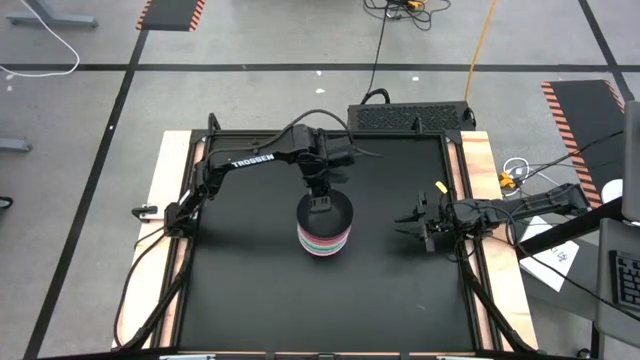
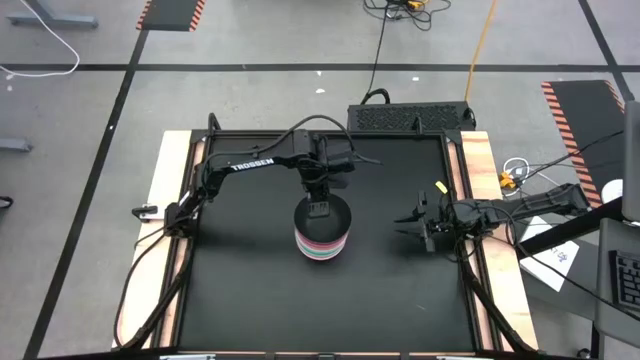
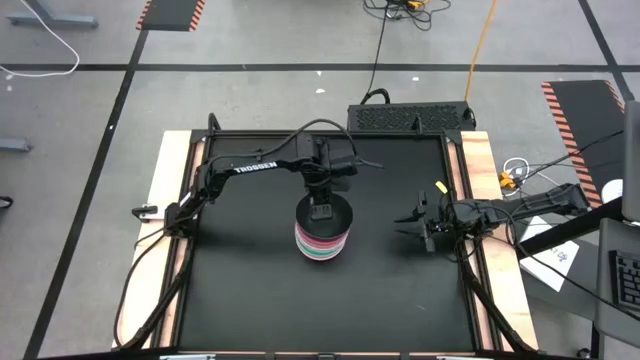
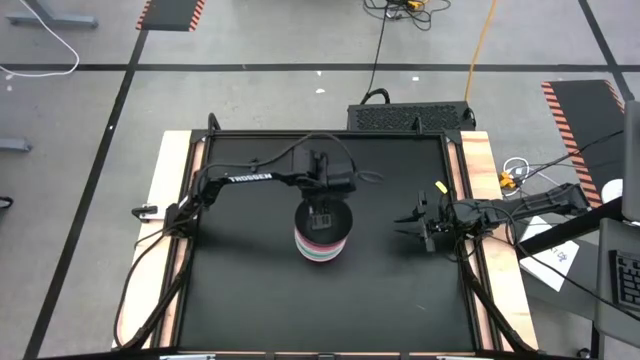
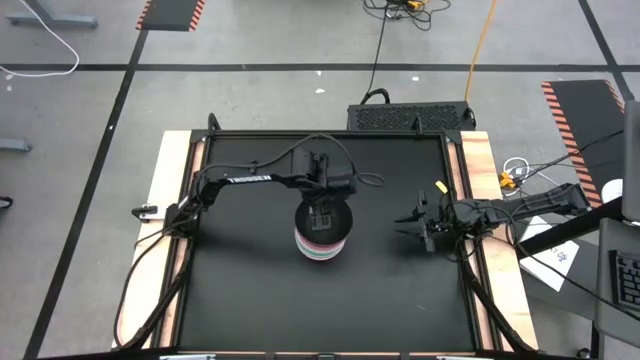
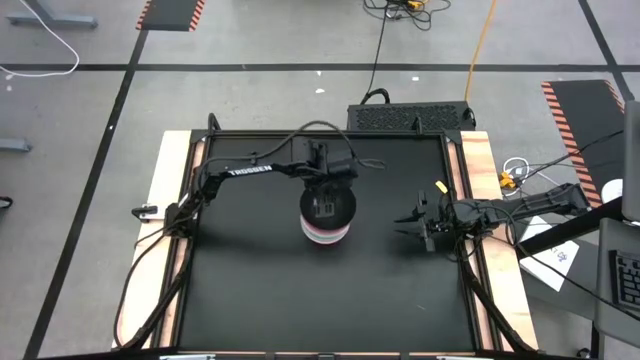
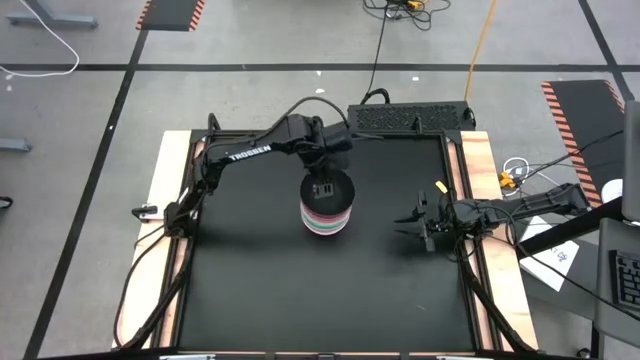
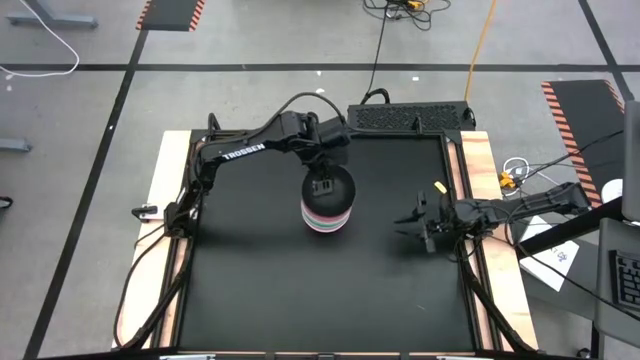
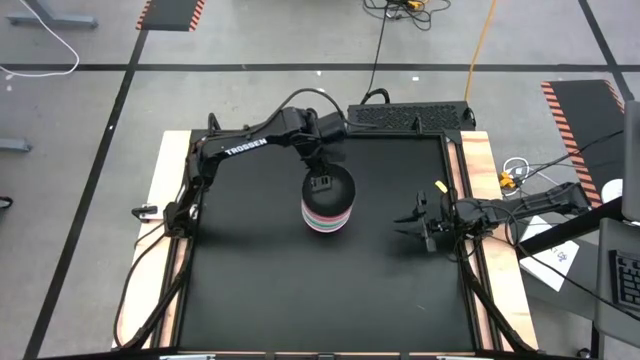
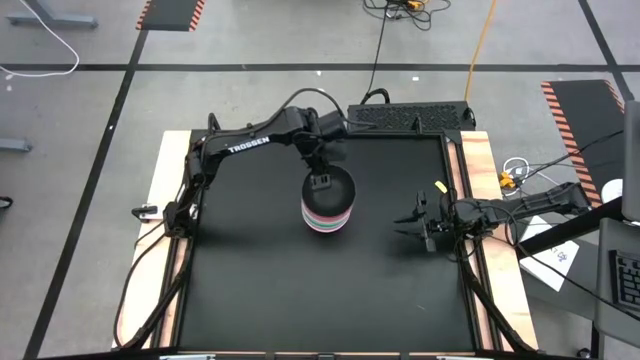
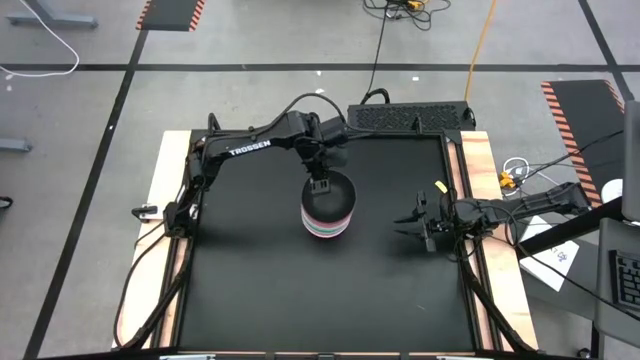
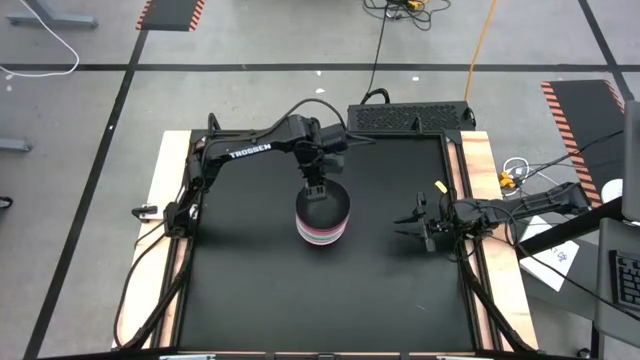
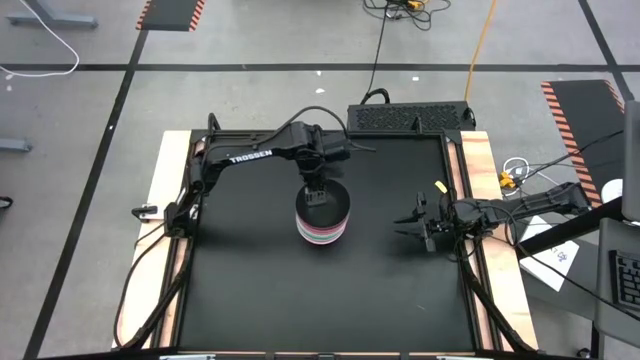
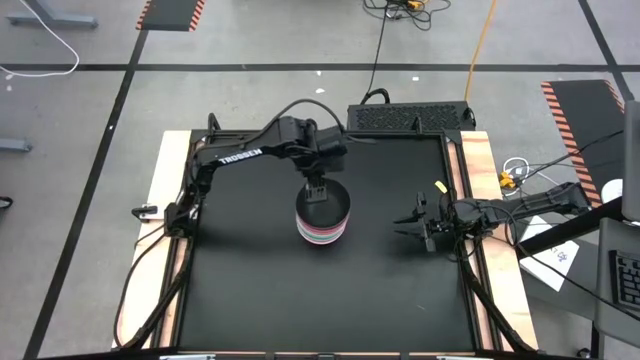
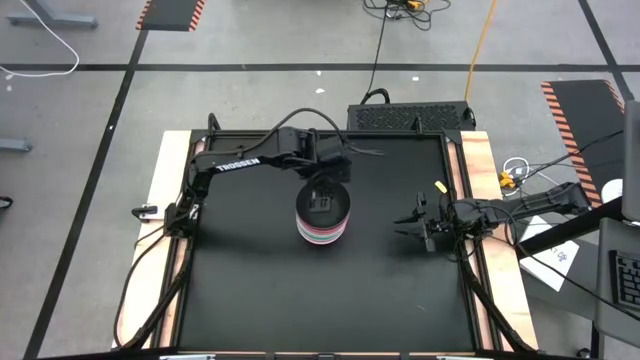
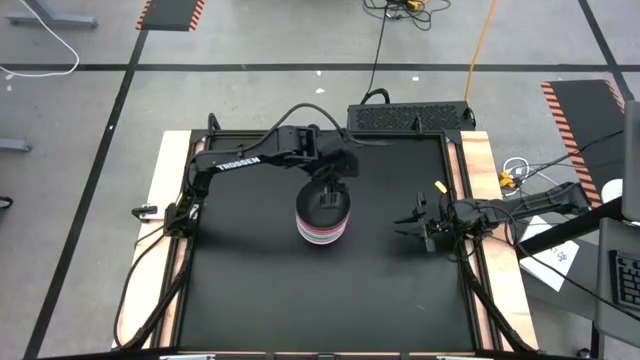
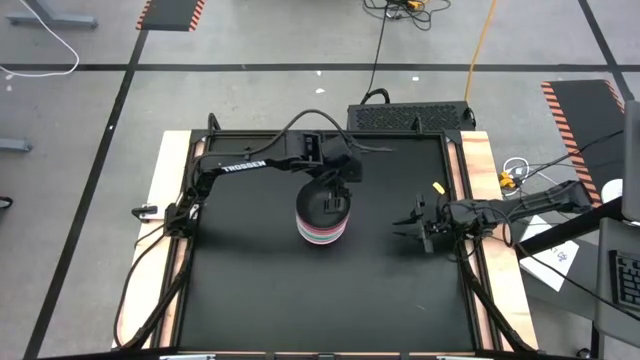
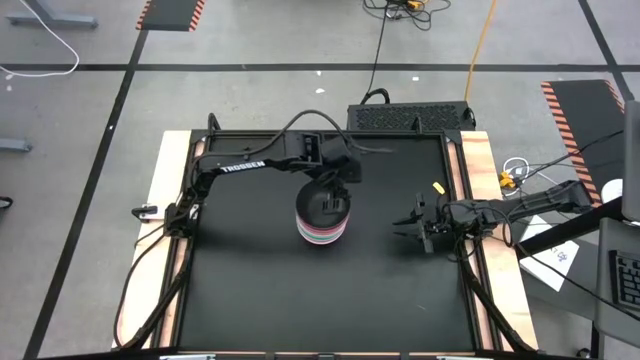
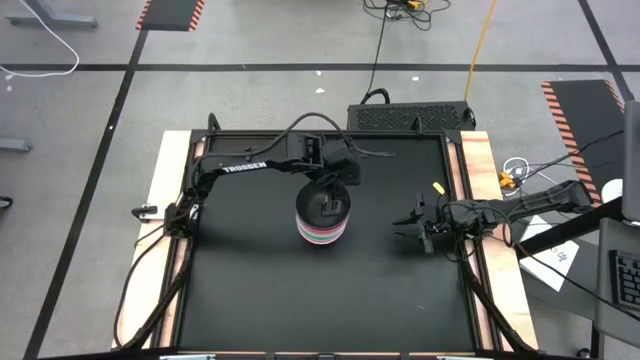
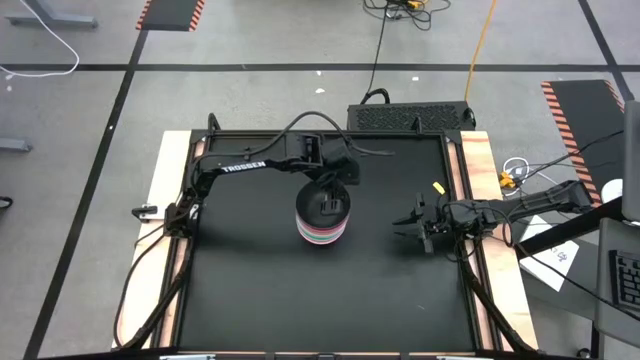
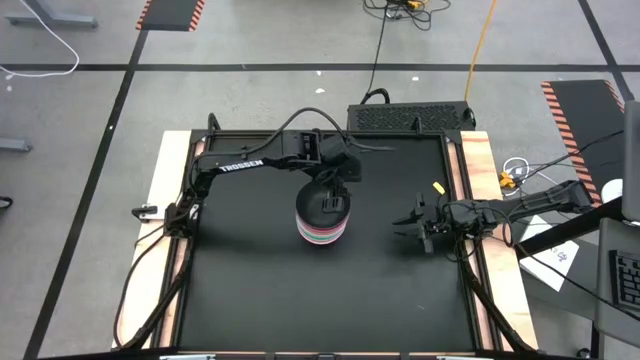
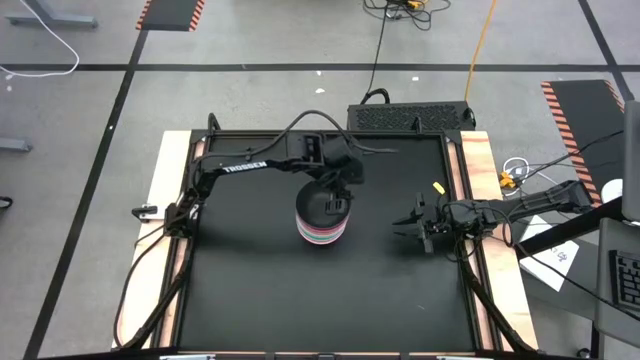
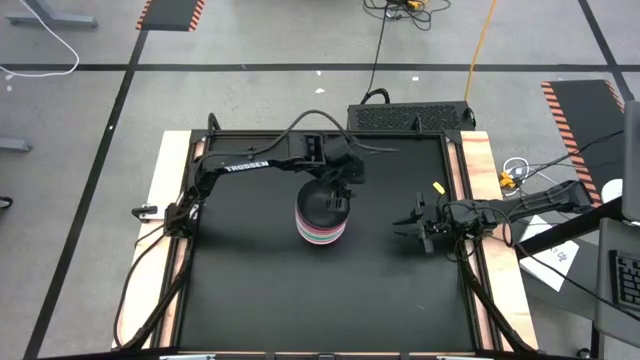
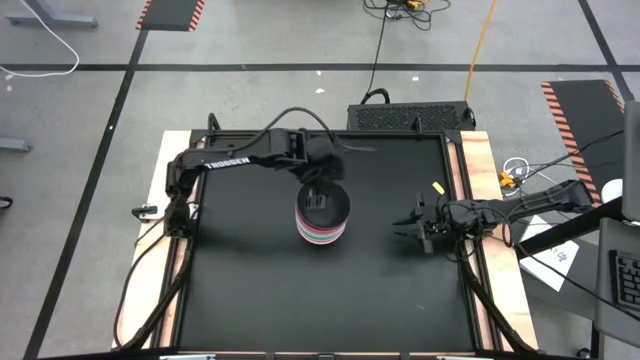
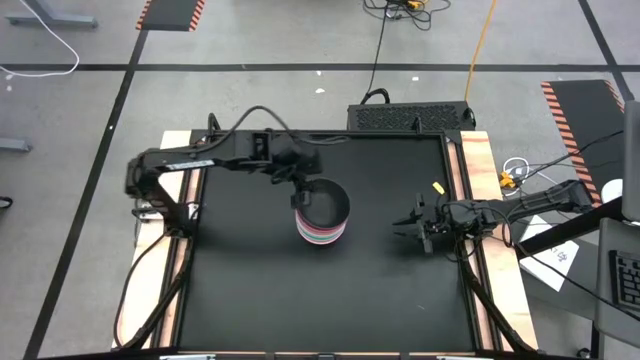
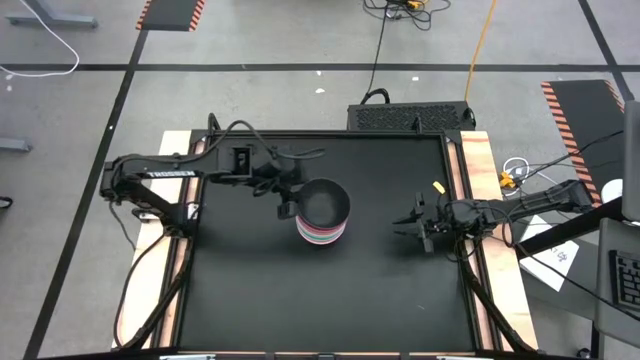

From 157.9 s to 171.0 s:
Task: Nest bowls inside each other
Stack the black bowl on top of pink bowl

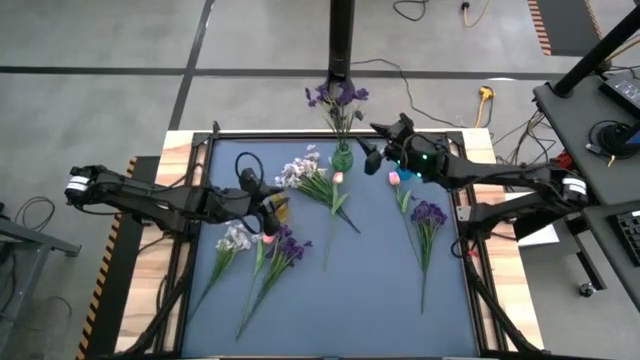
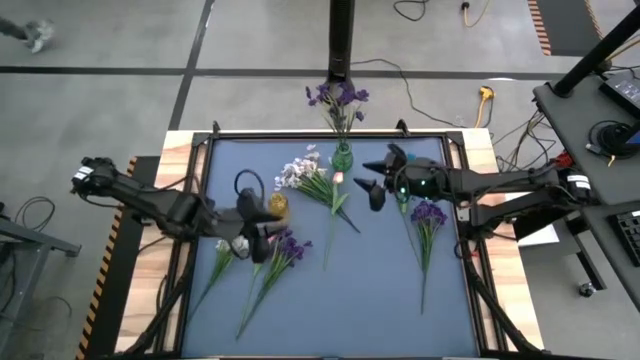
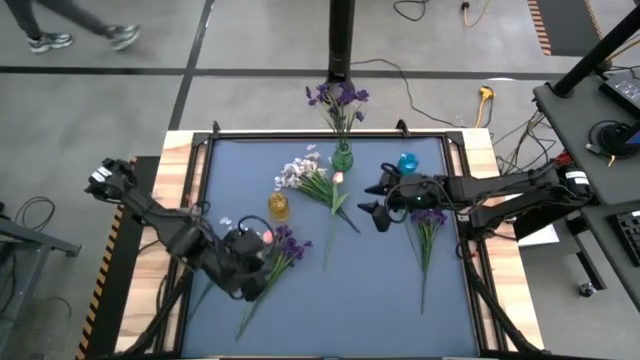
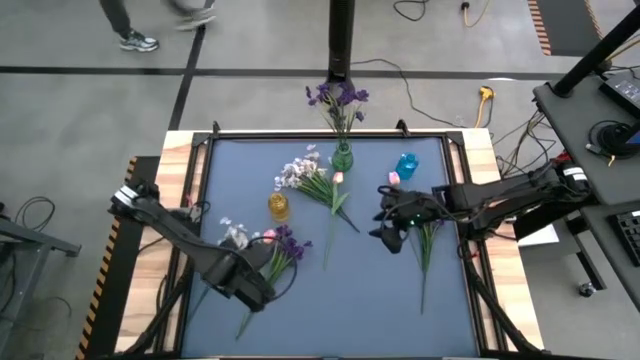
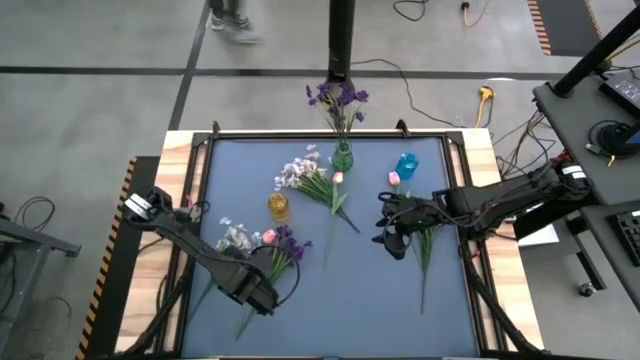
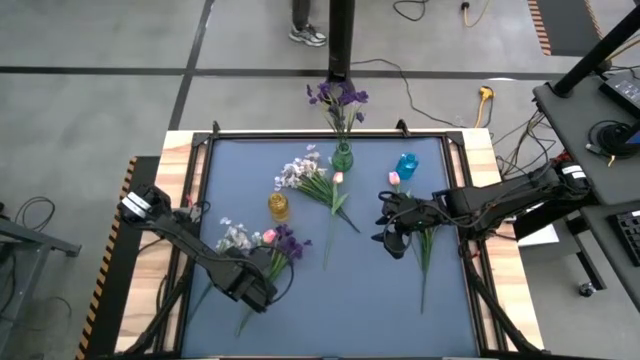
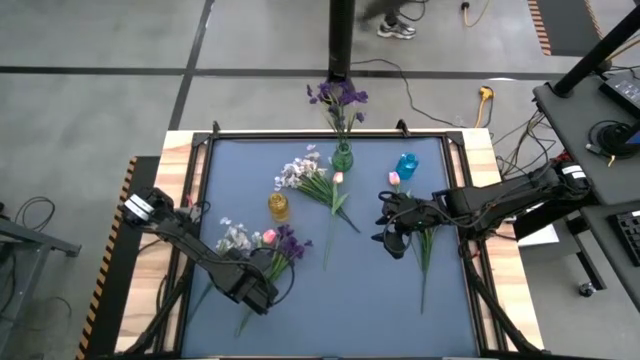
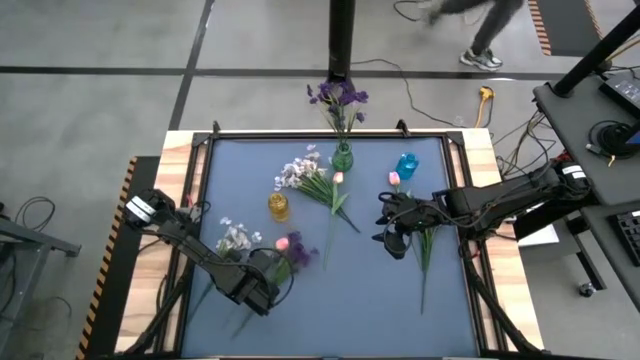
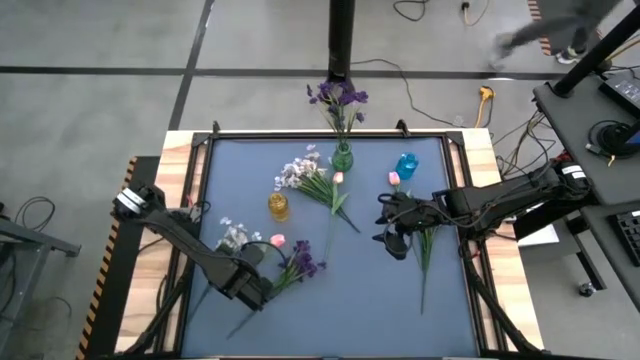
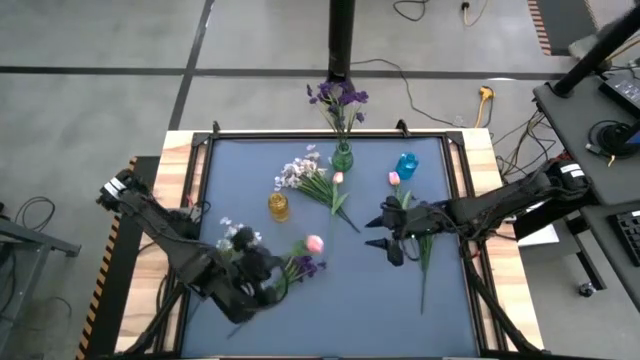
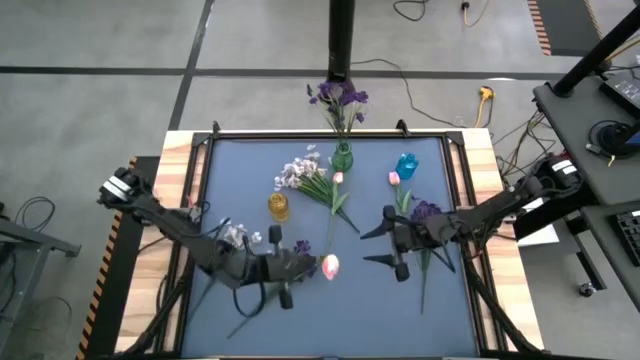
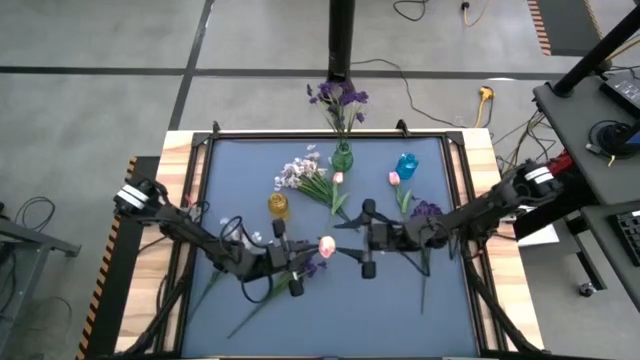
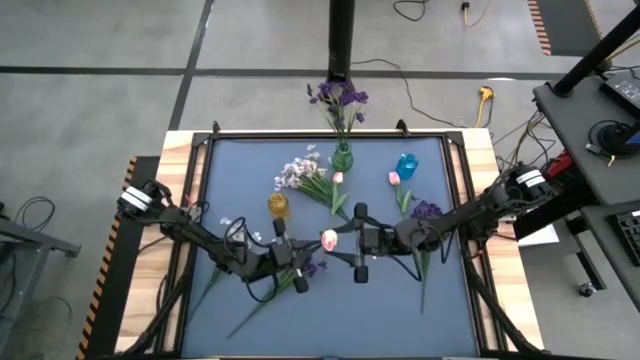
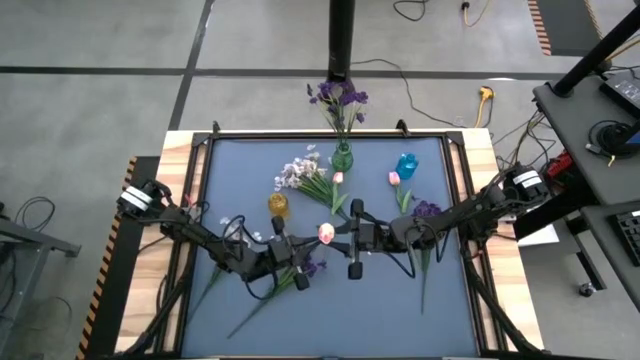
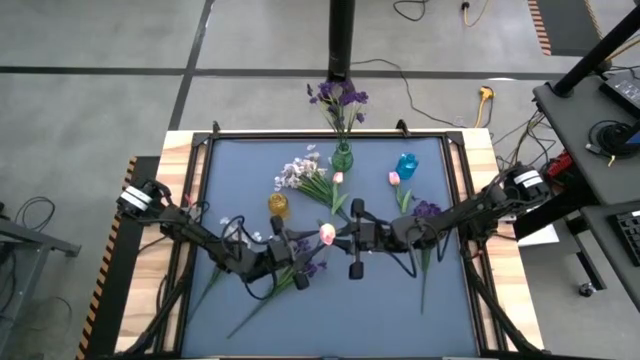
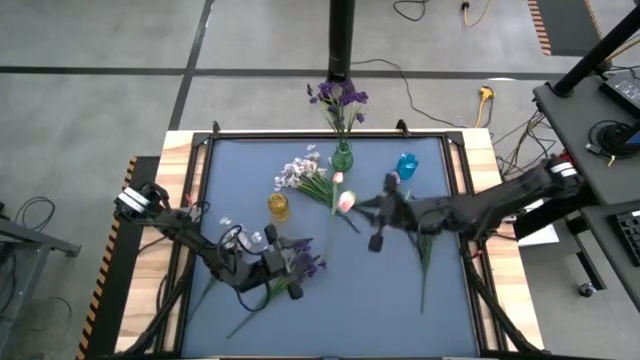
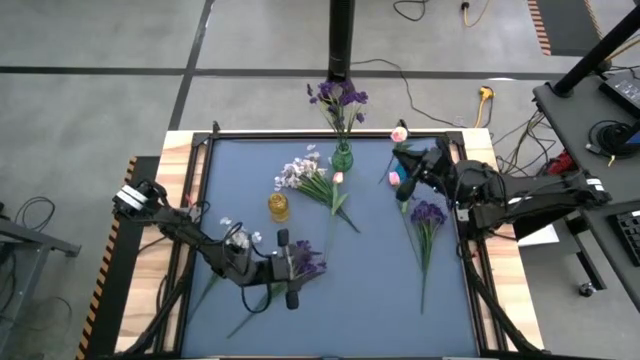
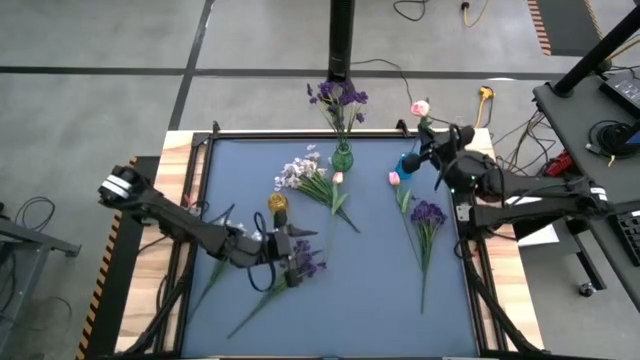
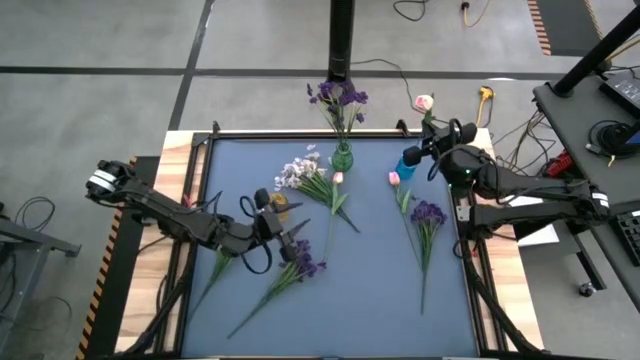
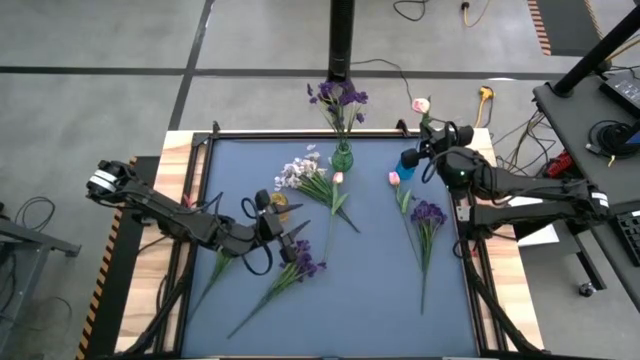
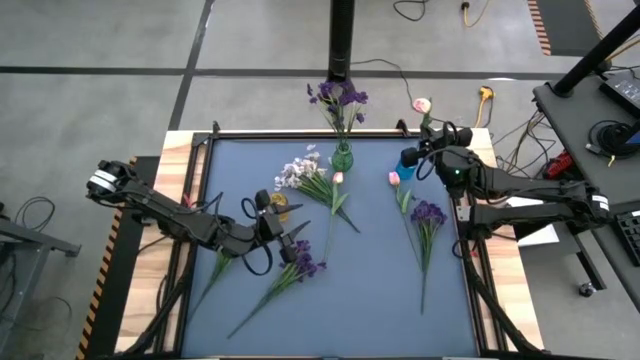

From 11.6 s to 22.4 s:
Task: Sort flowers into vase by color
Put the bottom pink flower into the blue vase
